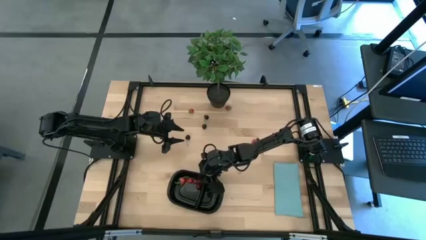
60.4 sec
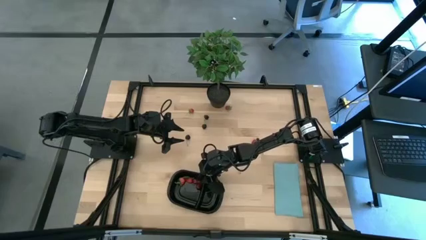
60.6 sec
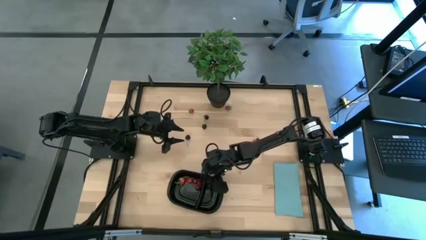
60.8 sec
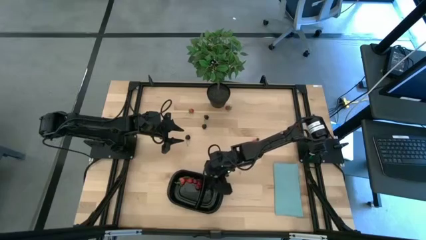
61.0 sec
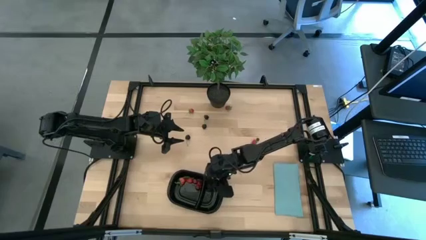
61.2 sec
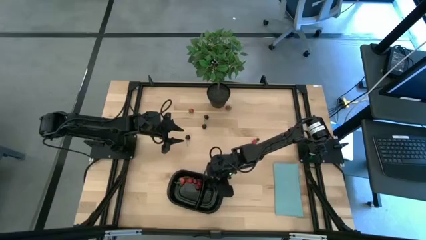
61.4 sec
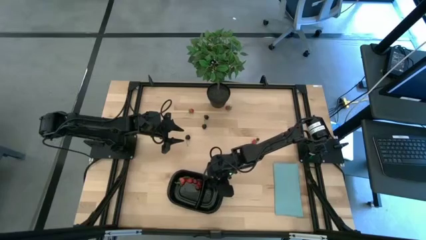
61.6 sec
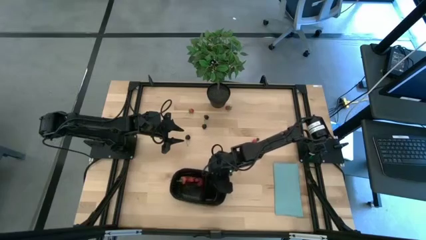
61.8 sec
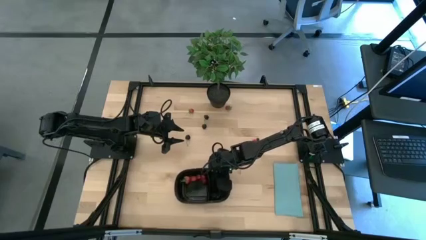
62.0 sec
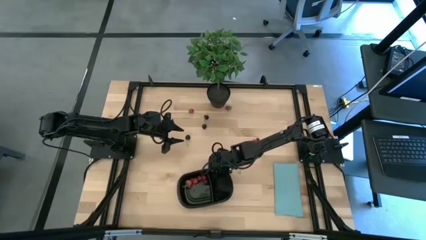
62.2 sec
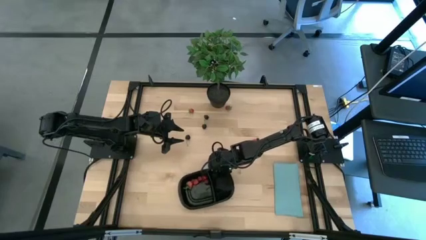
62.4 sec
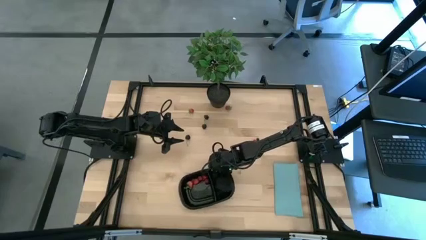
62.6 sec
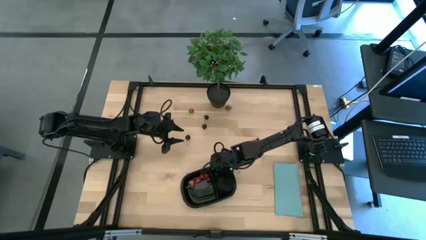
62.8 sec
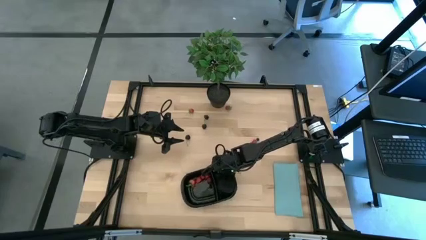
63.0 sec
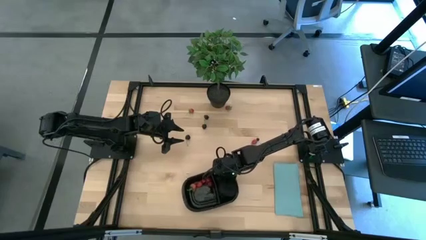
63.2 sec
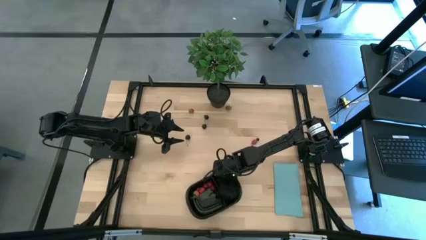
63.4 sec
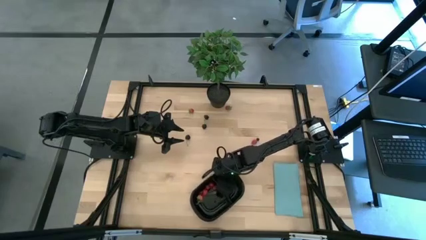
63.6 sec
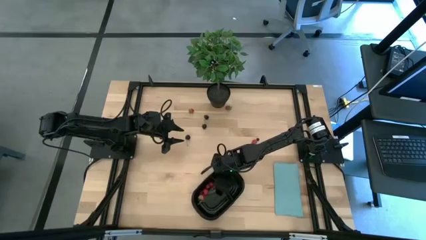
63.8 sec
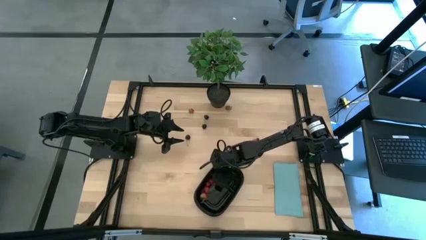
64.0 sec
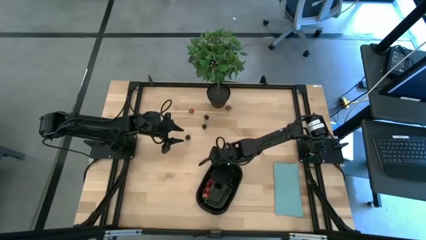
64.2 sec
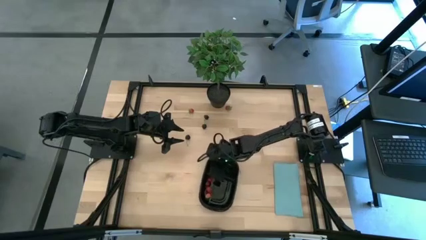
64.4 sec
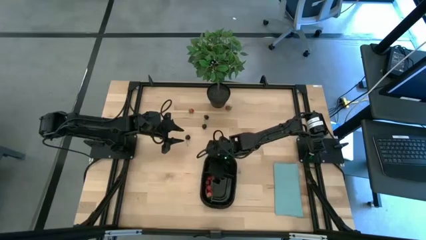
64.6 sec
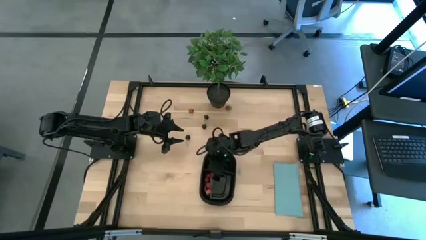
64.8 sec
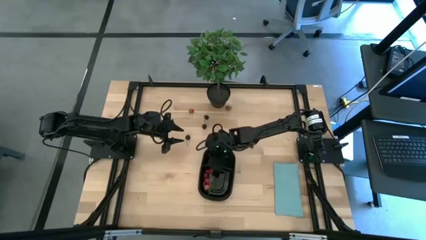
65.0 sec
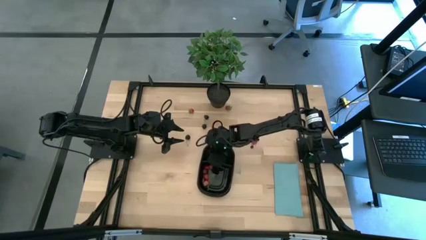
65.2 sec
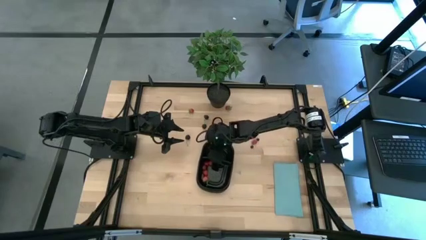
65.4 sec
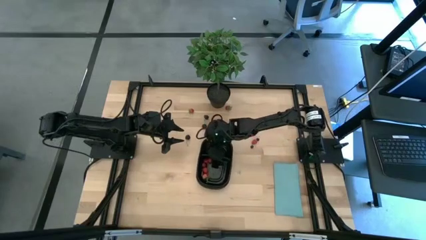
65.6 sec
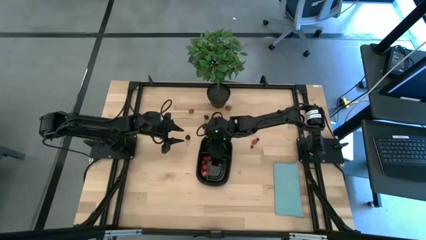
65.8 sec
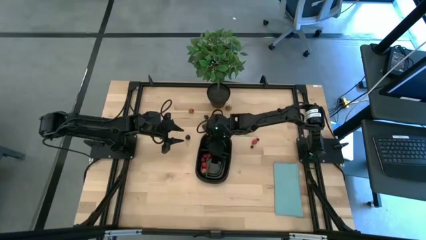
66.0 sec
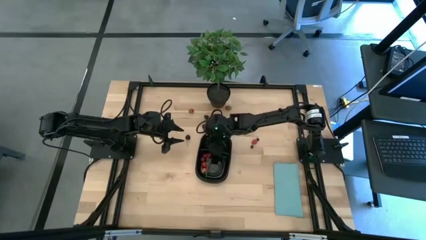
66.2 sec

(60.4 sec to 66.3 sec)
Task: Pick and placing Produce into tupperware
Move the black container to the center of the table

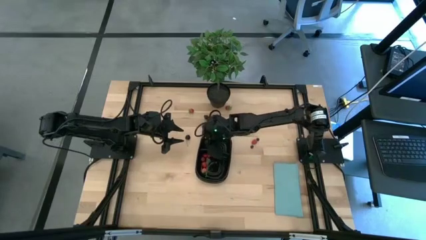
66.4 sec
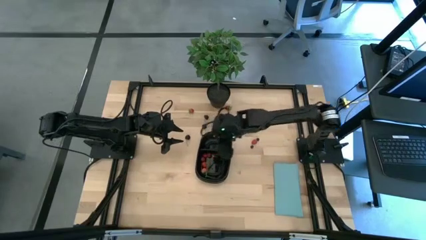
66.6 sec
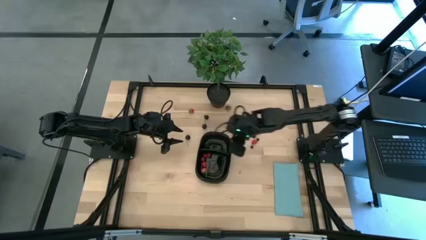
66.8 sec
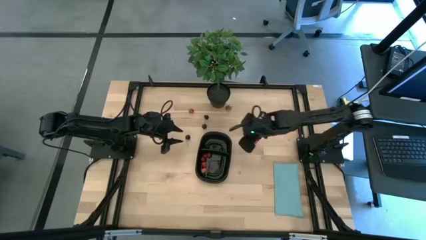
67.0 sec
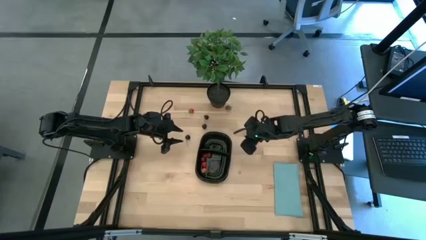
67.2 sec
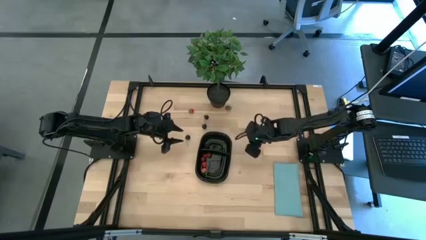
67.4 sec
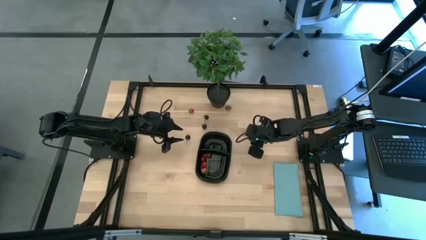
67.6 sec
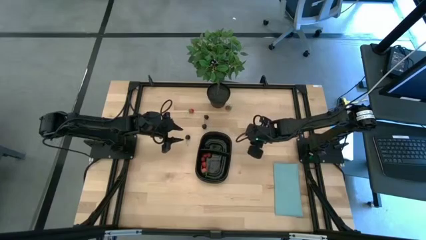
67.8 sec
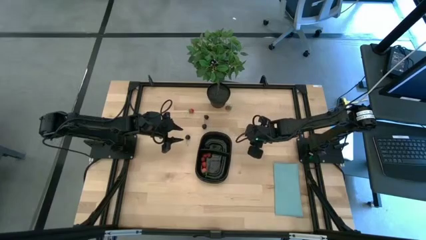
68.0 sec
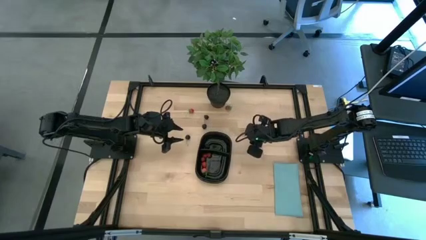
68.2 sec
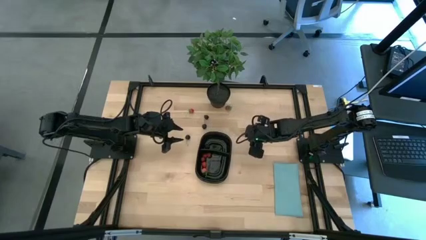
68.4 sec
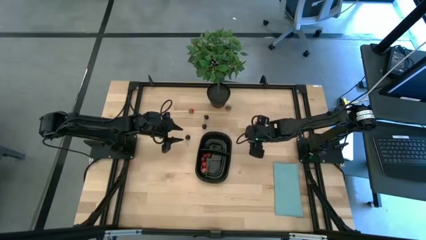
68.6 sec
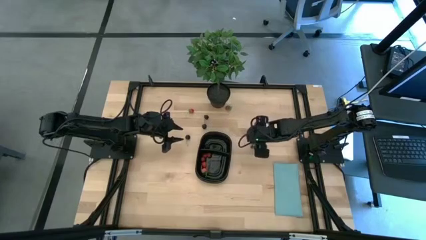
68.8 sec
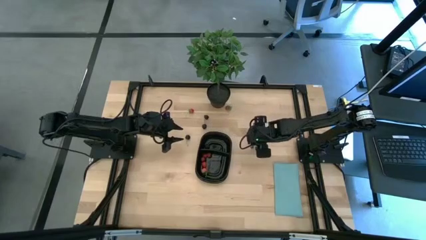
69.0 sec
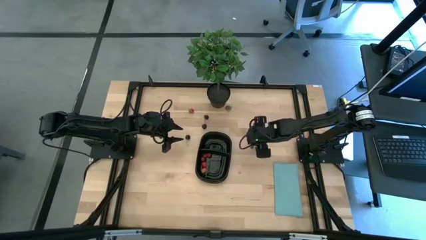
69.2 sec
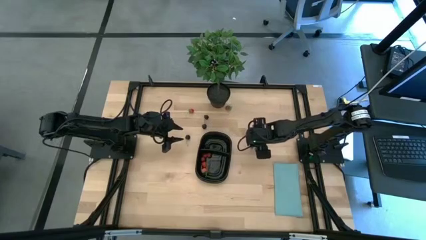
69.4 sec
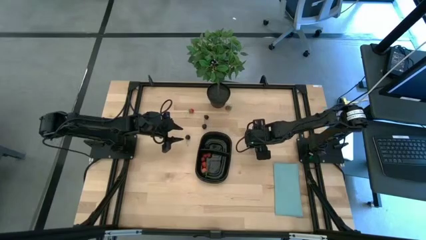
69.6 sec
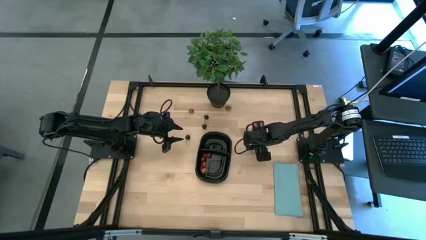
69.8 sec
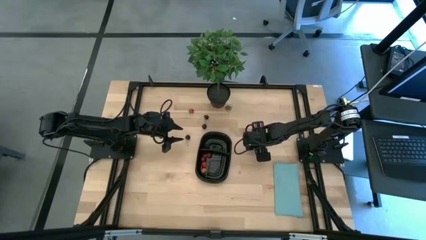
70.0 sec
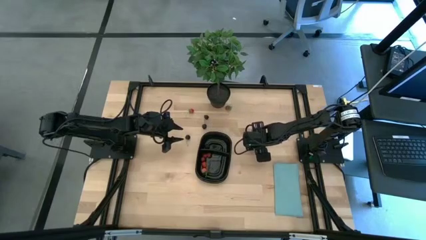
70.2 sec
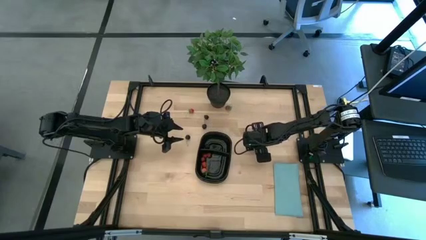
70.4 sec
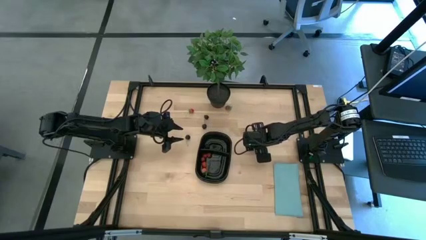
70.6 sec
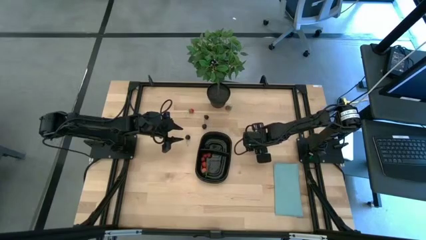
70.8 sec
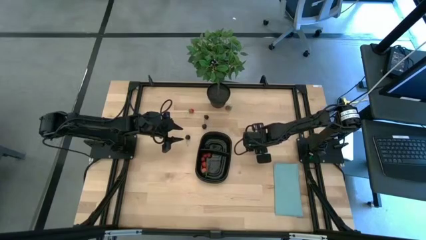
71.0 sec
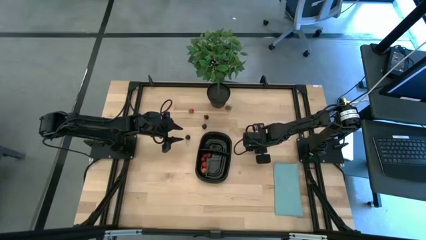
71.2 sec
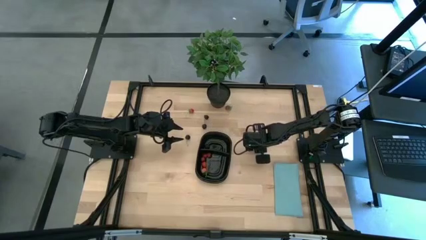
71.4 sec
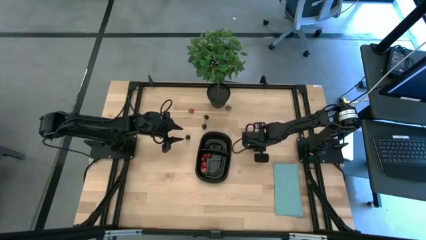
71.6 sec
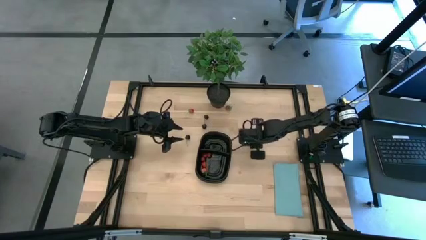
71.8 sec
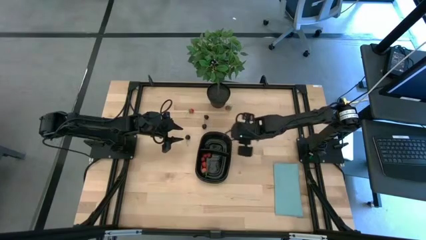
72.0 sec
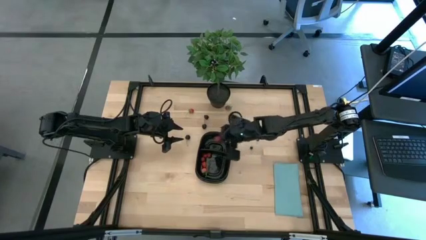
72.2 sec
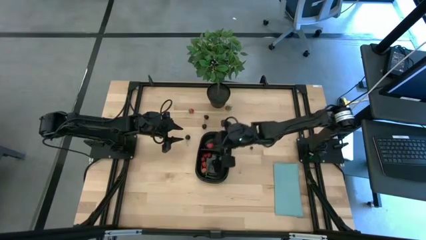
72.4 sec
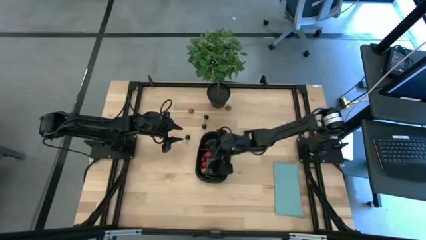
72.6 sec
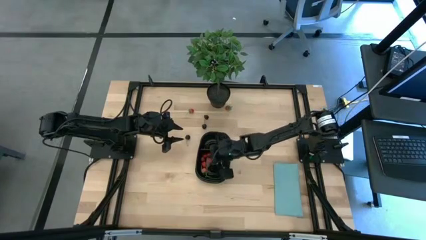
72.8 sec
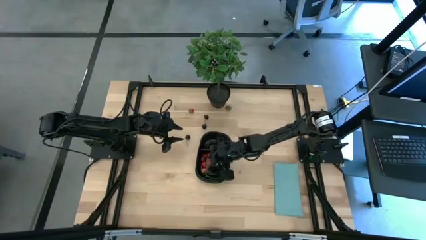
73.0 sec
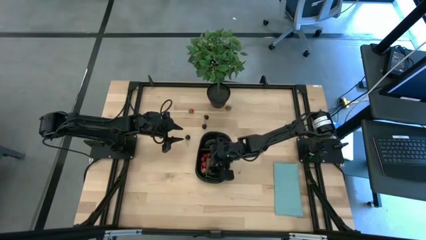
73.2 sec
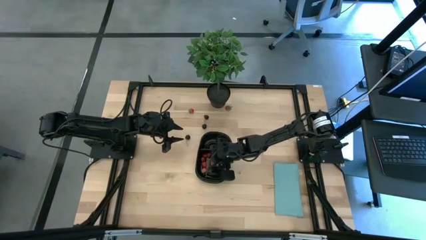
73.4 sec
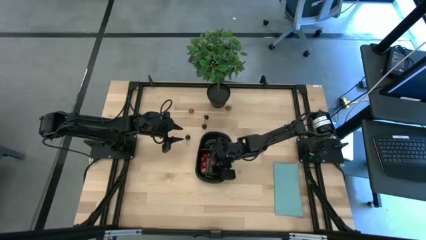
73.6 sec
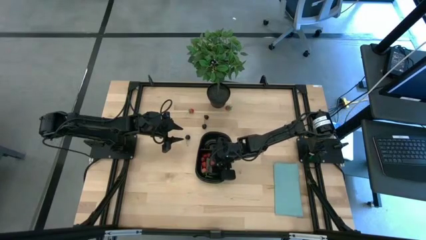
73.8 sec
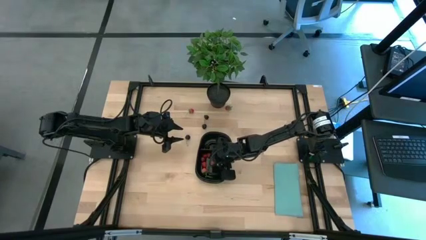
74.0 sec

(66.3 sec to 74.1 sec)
Put the red raspberry into the black container with the other red fruits

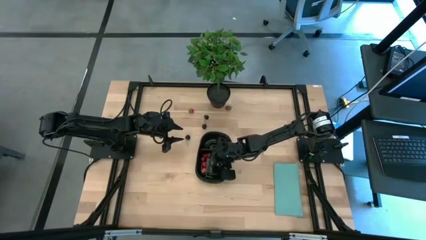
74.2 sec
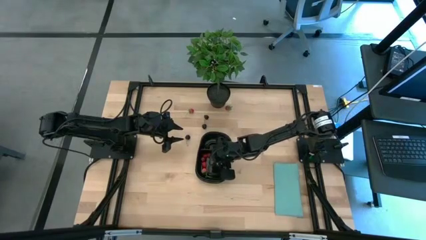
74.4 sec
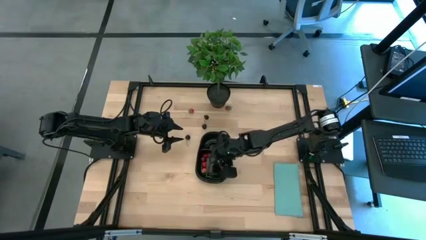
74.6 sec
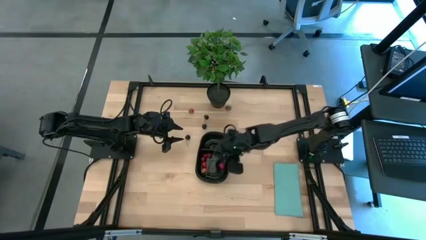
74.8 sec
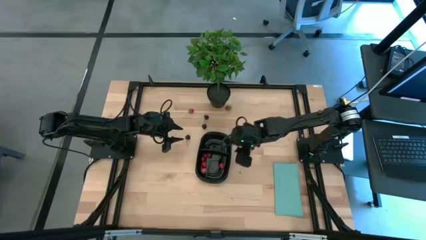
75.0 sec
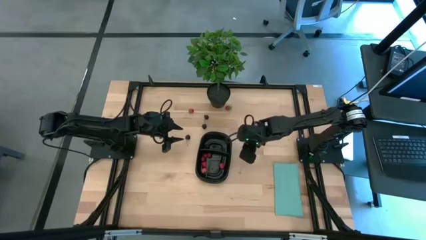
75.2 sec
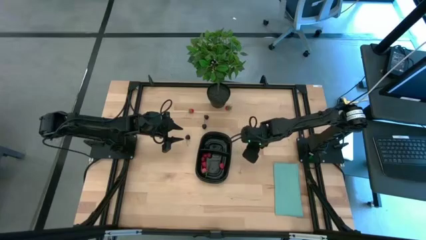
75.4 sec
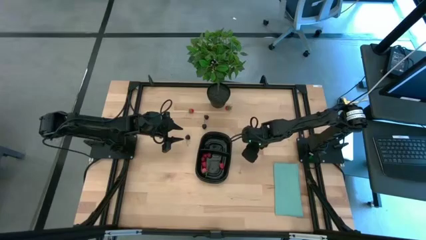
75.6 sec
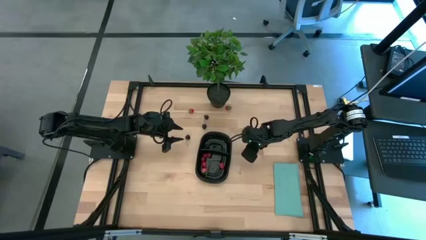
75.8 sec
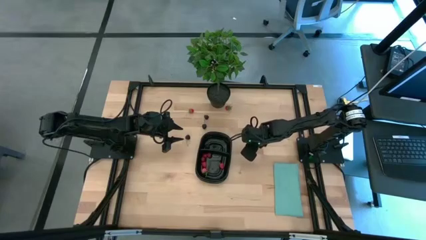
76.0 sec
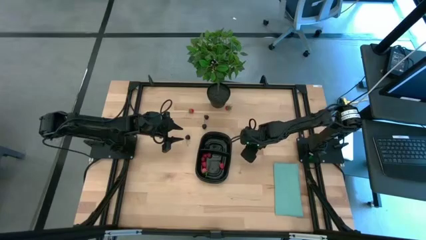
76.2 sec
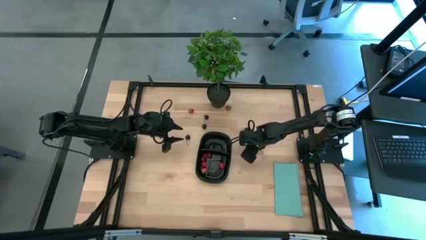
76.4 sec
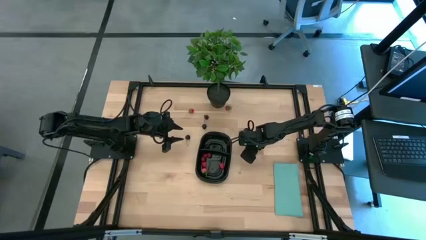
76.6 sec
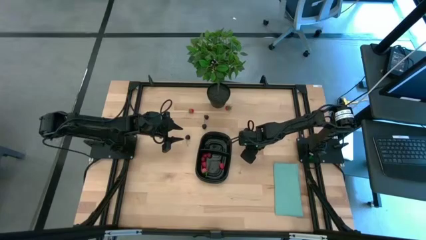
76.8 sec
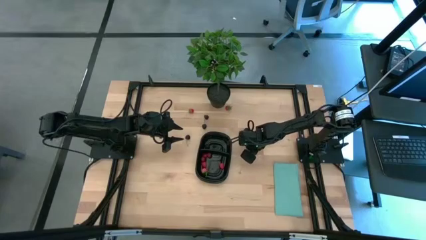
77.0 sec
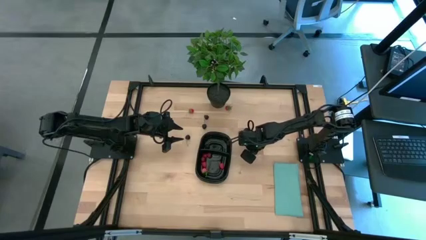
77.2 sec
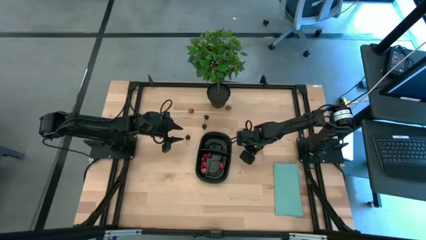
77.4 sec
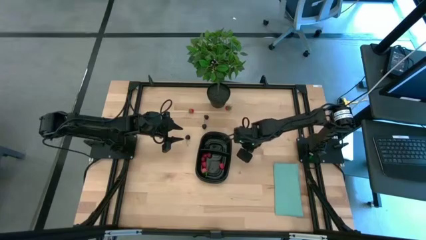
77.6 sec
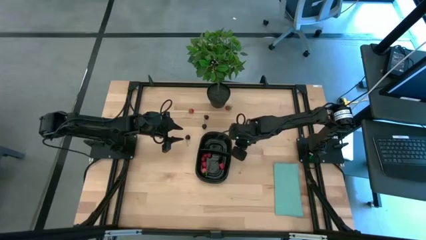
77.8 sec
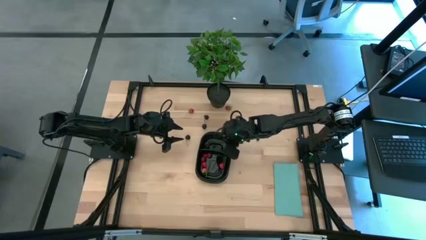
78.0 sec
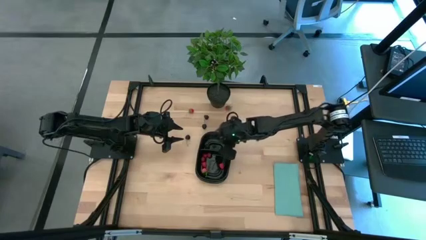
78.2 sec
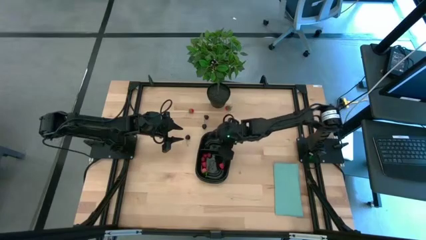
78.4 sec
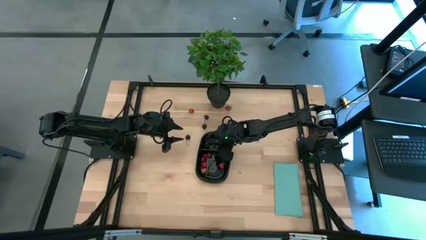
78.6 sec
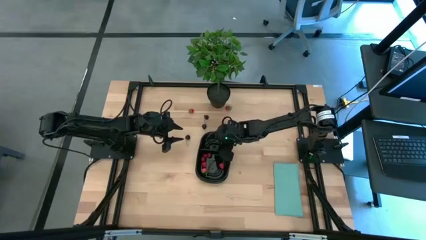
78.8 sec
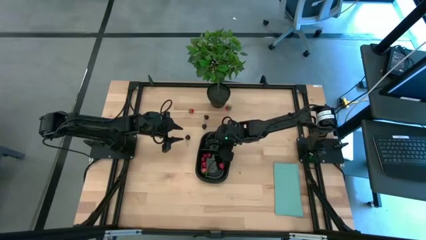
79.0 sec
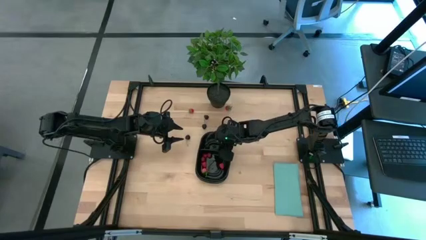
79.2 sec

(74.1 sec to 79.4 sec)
Put the bottom blueberry into the black container
